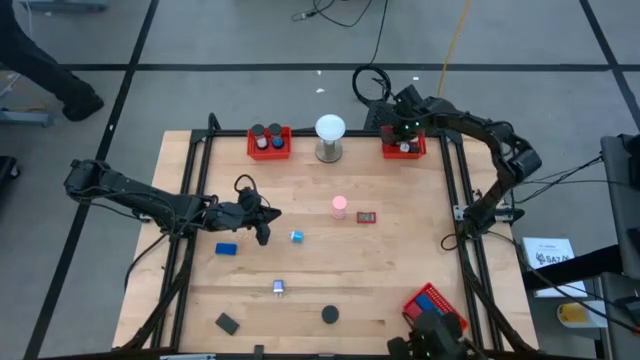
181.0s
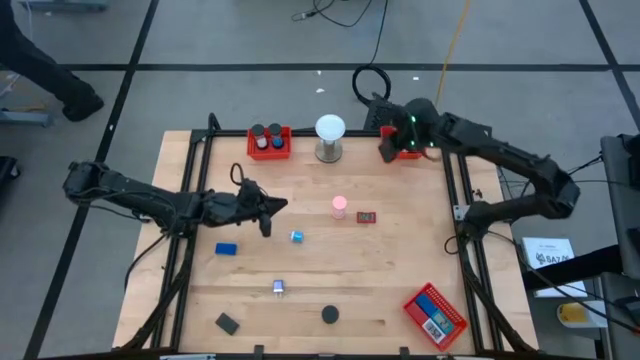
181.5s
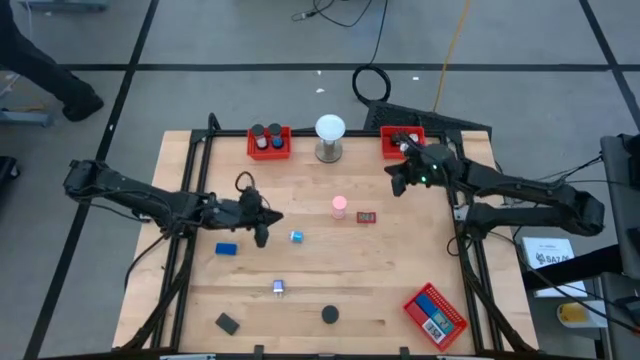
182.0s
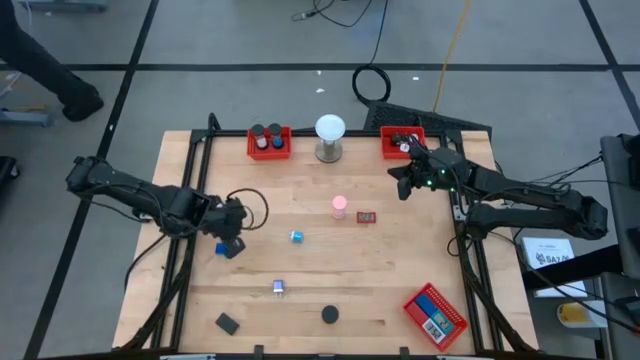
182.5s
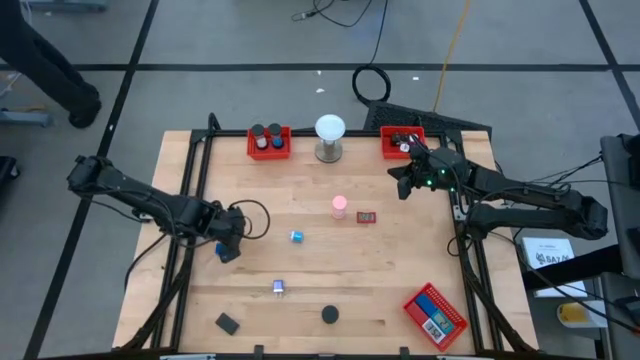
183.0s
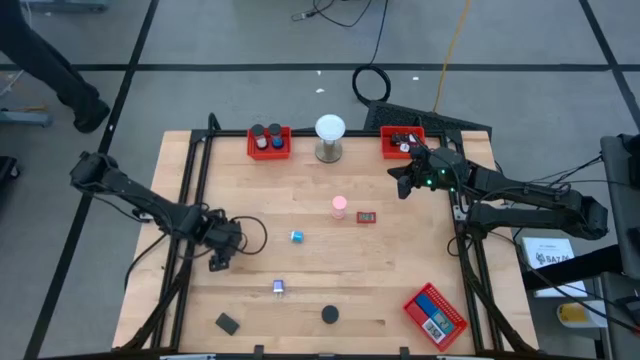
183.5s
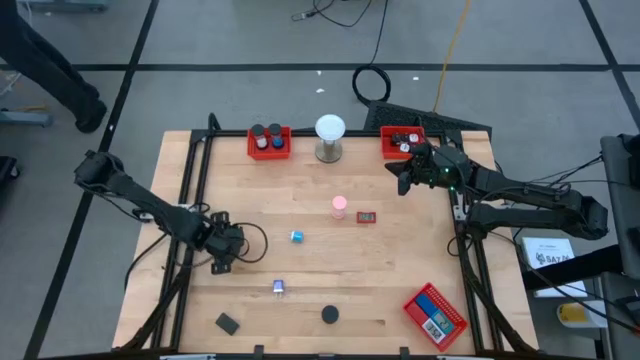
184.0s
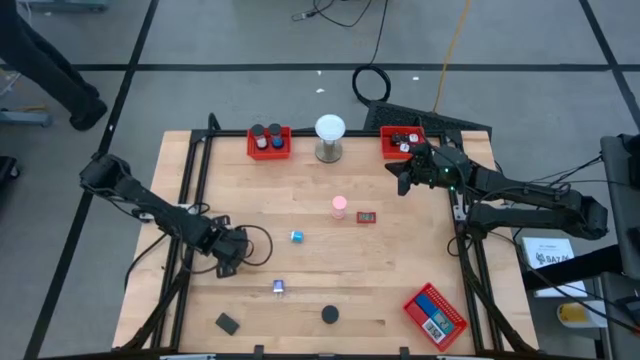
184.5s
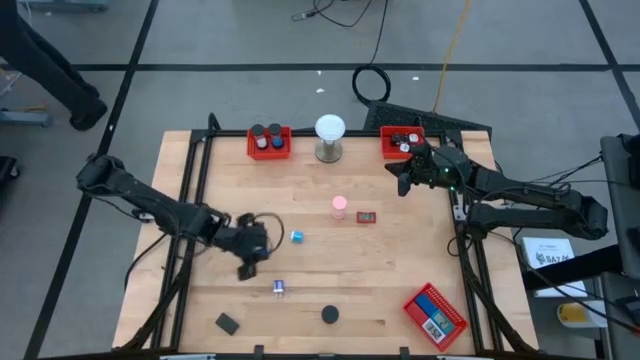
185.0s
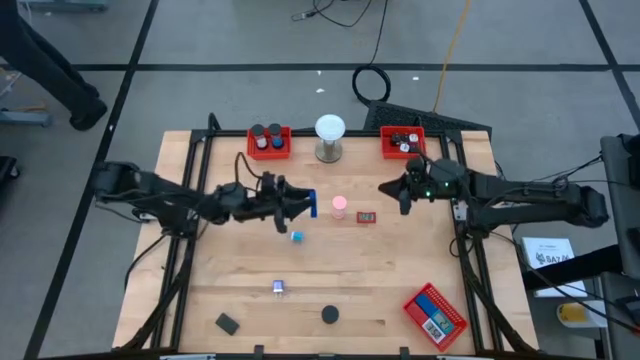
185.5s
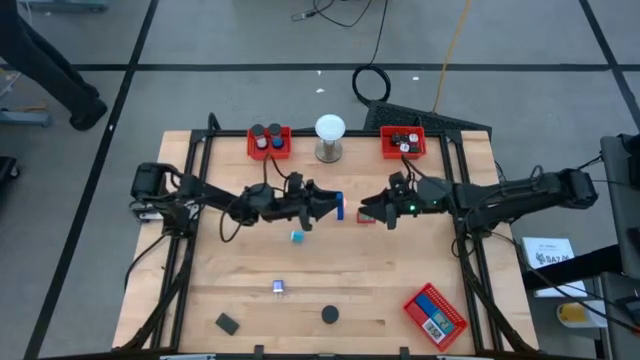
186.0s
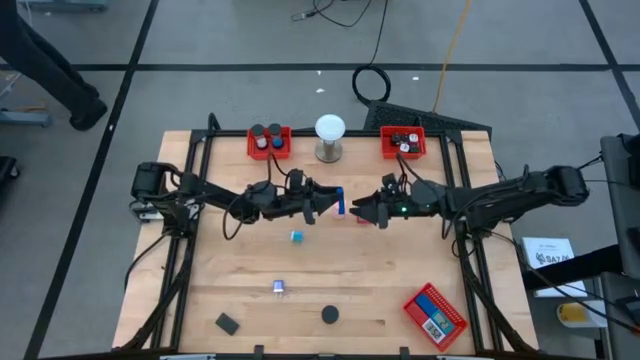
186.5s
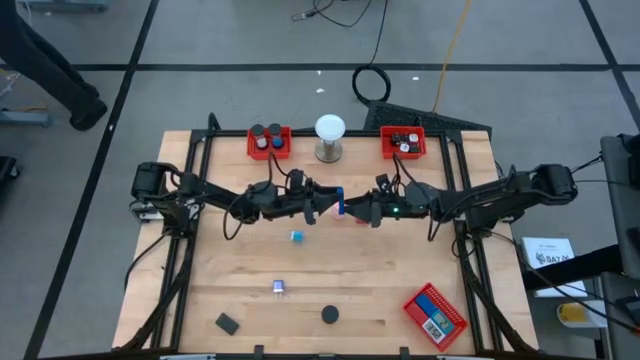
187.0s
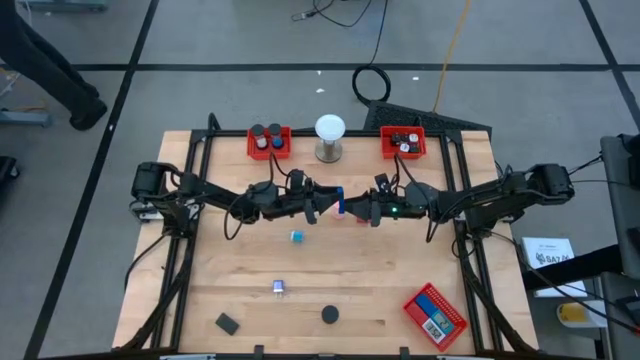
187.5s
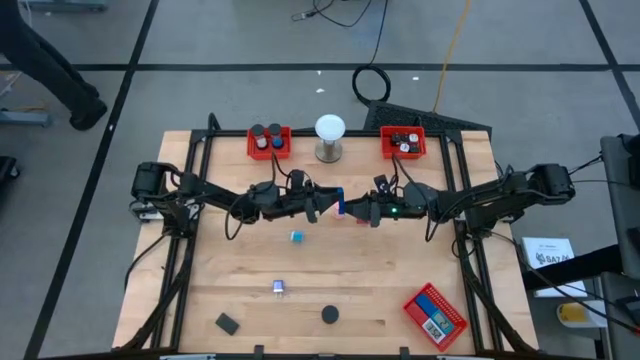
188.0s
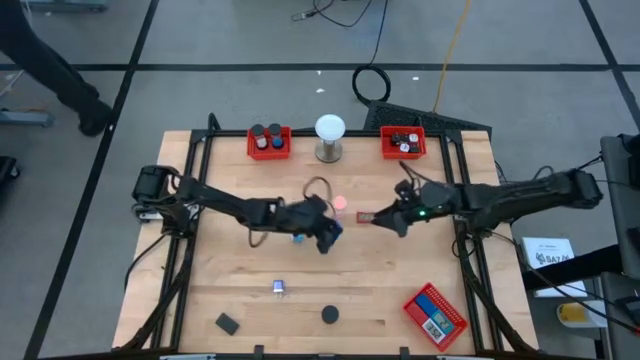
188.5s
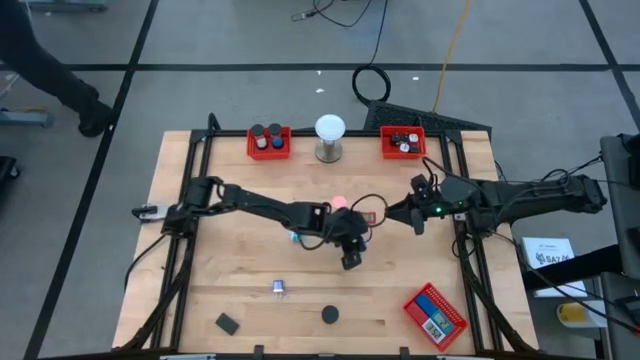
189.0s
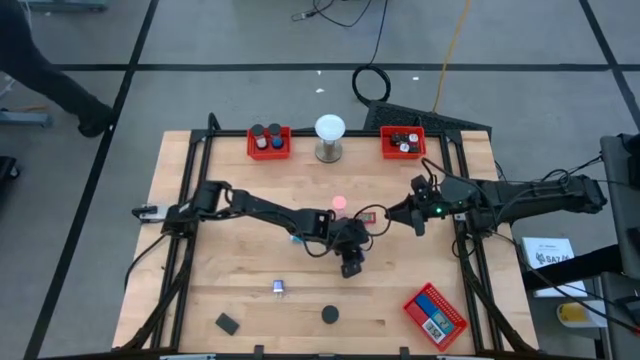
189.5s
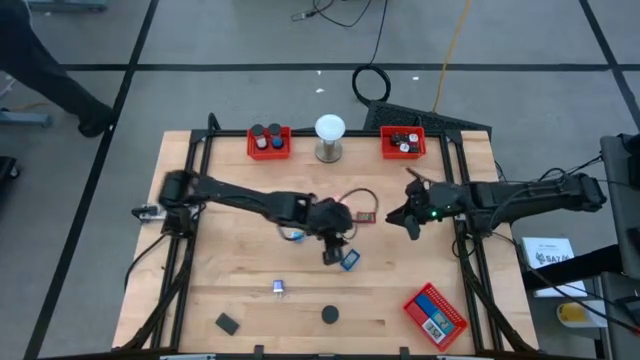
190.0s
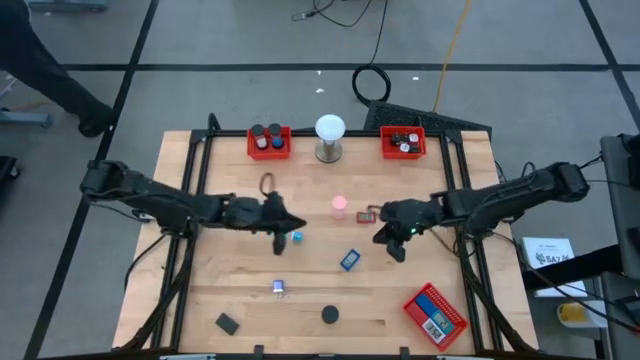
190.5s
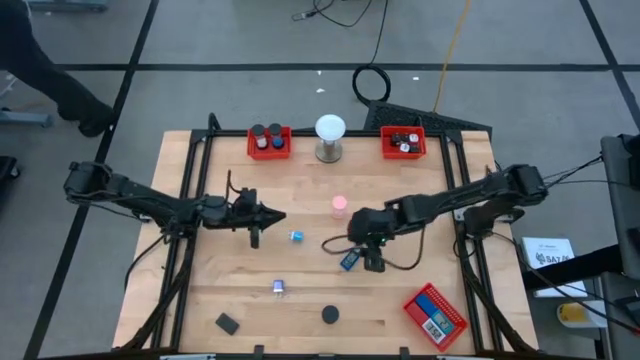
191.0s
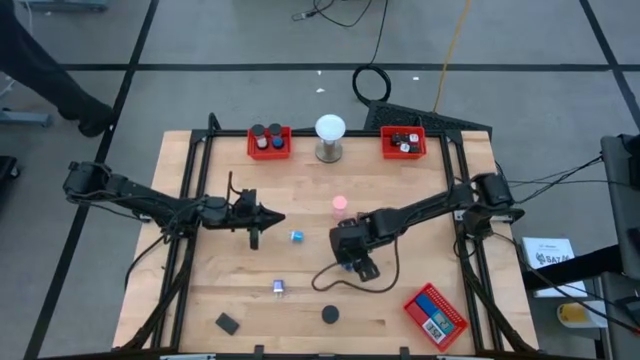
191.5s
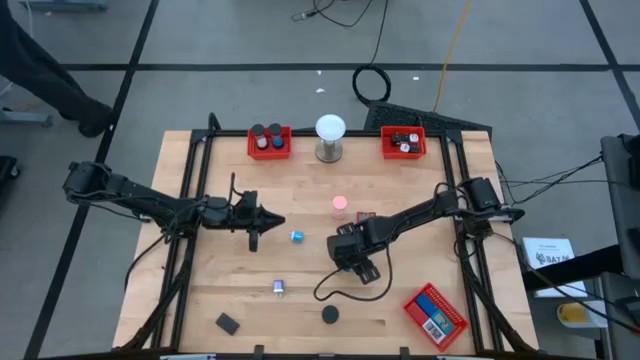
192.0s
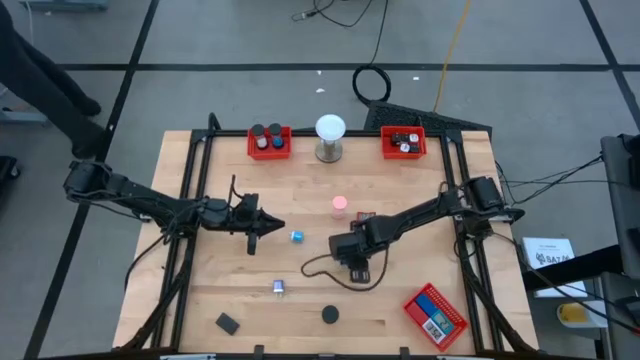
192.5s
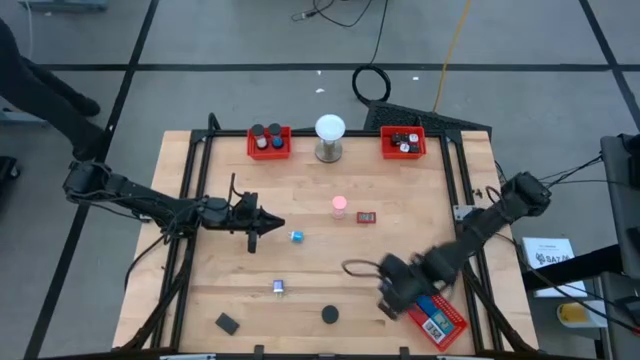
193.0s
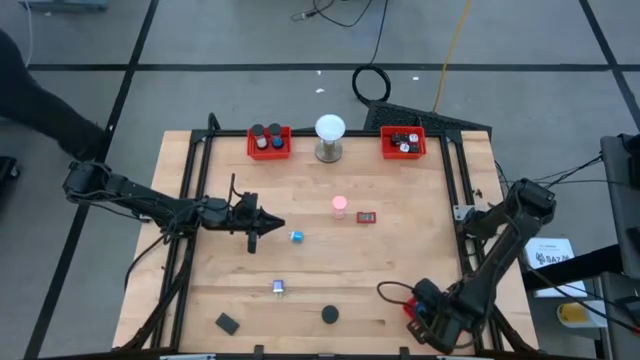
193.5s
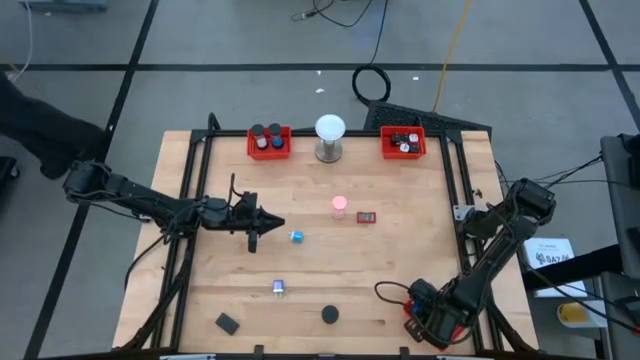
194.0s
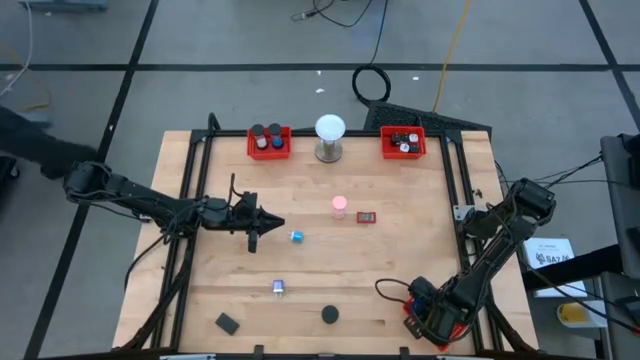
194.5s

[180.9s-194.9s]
Task: Pick & Place Office items
Put the blue digital clock into the bottom right red bin

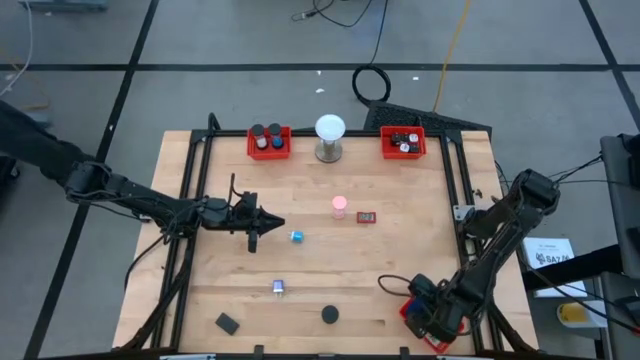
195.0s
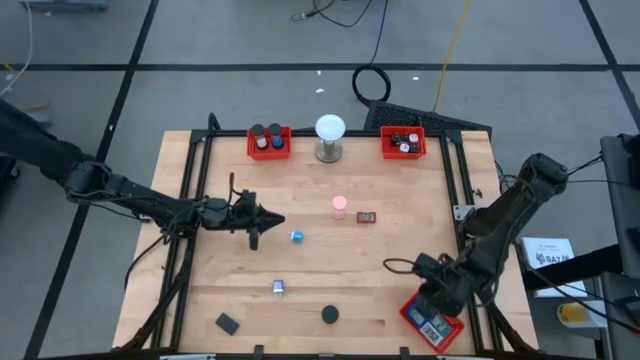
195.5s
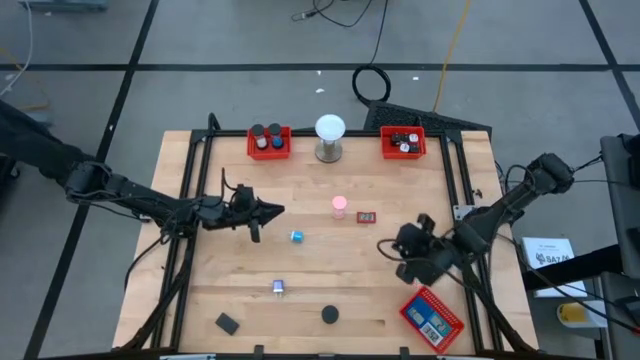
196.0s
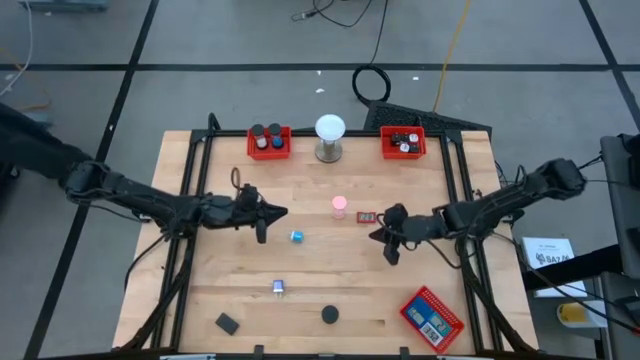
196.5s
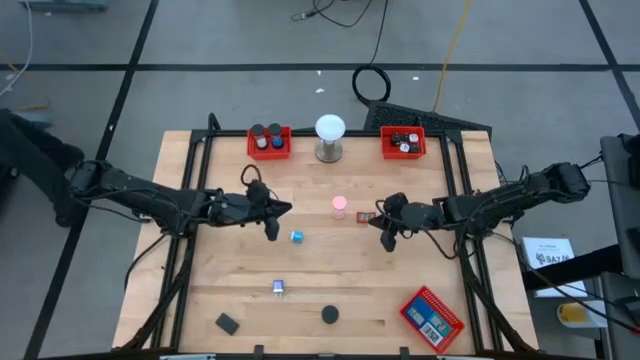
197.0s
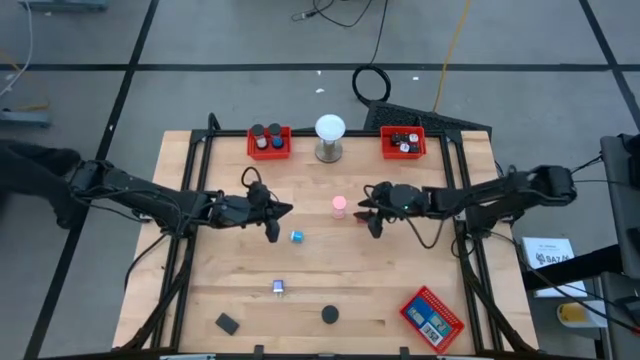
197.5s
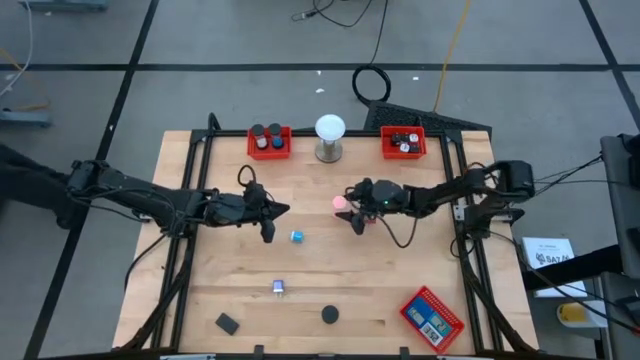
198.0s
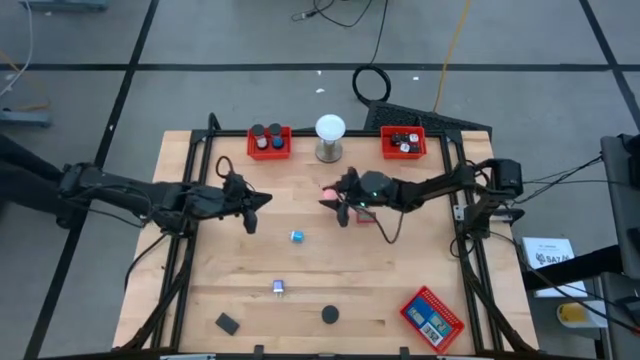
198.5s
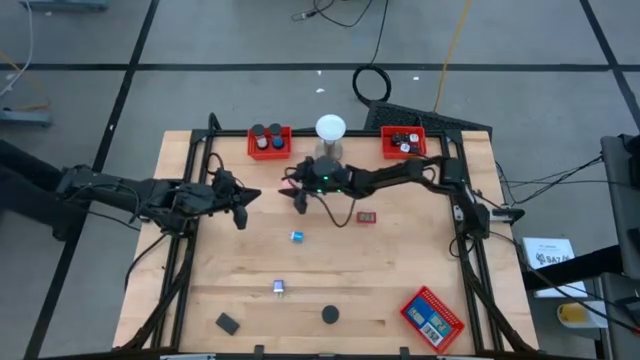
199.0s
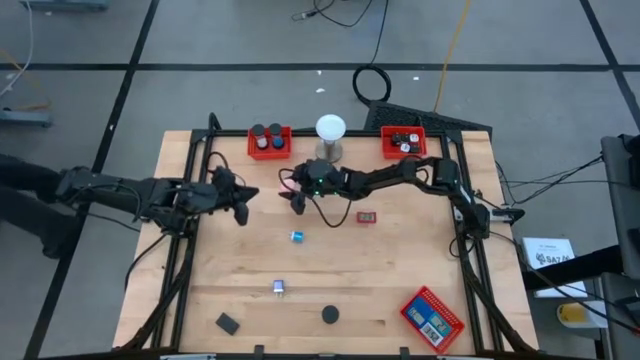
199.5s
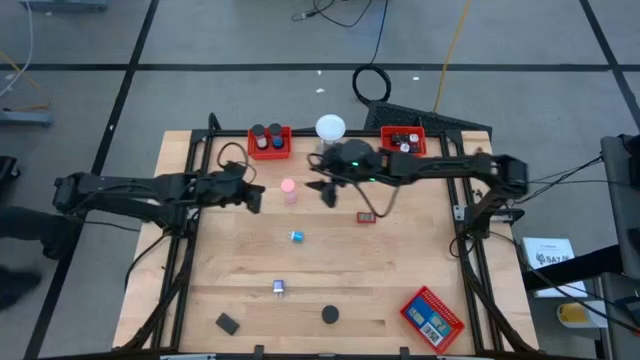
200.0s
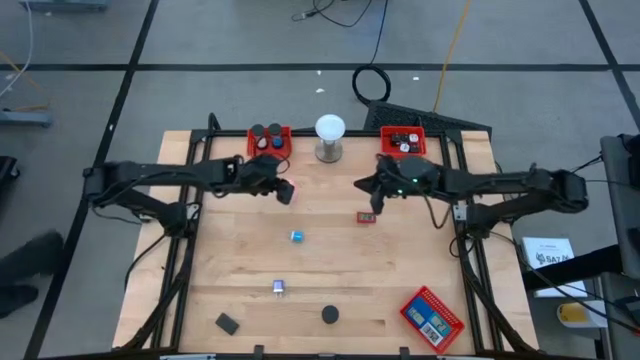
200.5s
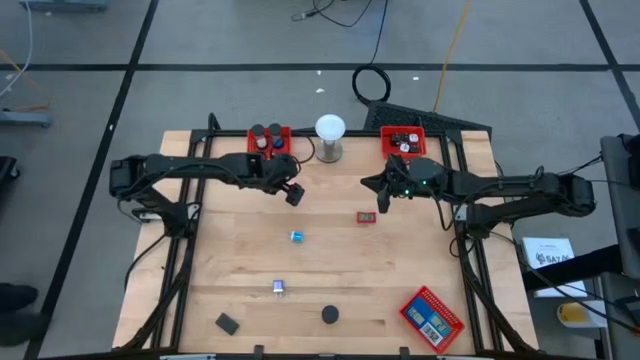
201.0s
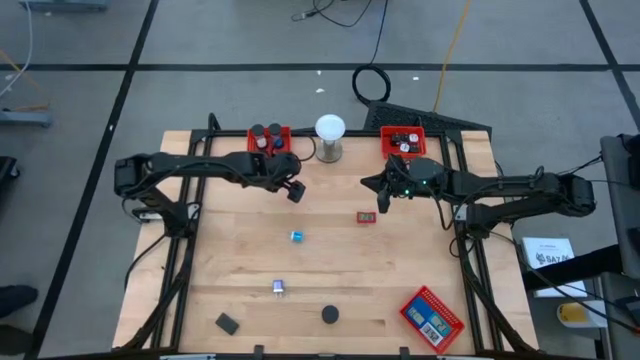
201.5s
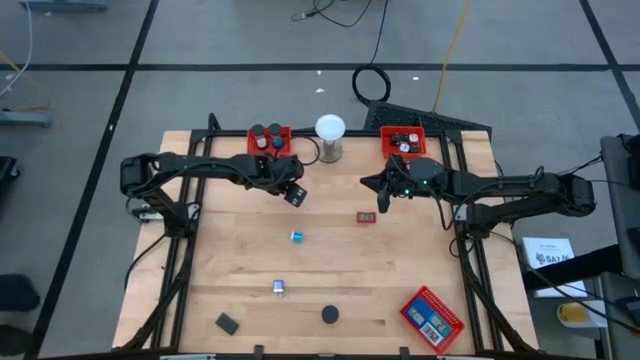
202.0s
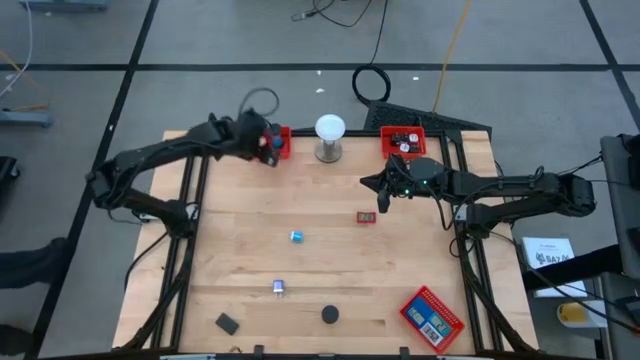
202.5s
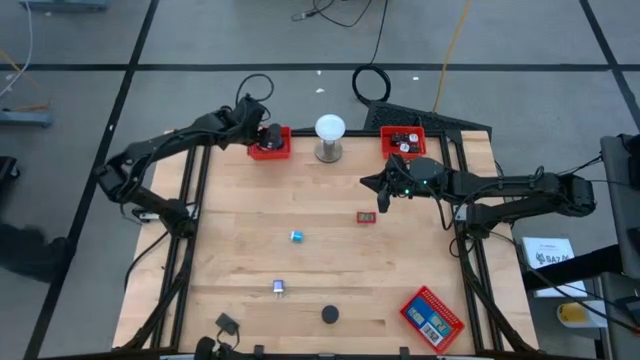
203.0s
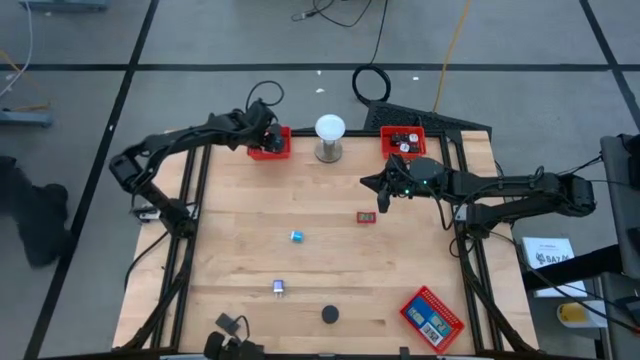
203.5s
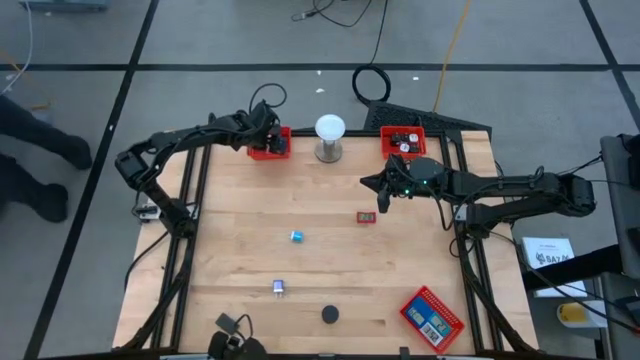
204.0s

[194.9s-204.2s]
Put the pink hourglass into the top left red bin
